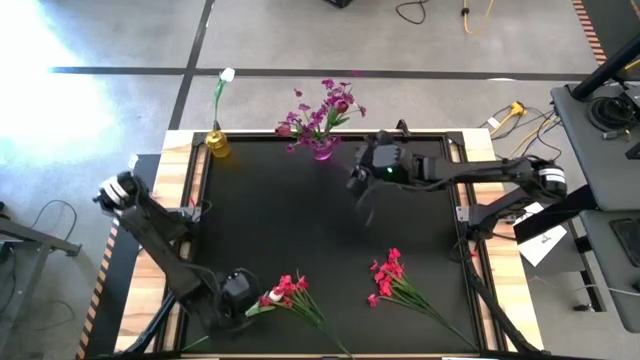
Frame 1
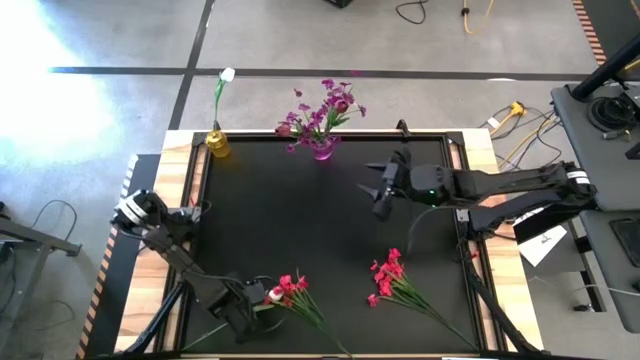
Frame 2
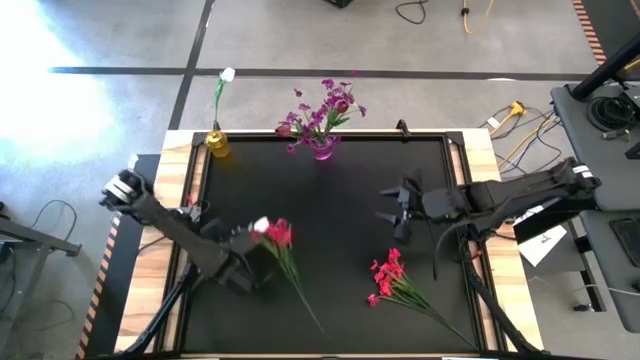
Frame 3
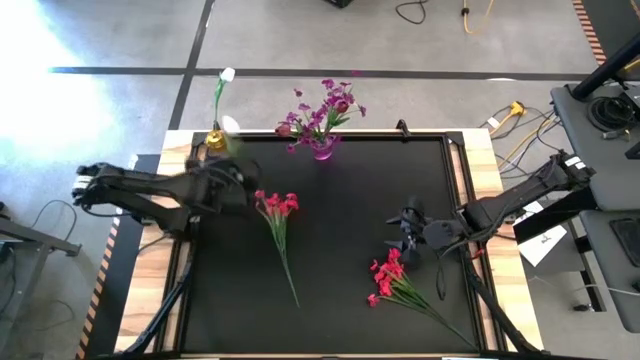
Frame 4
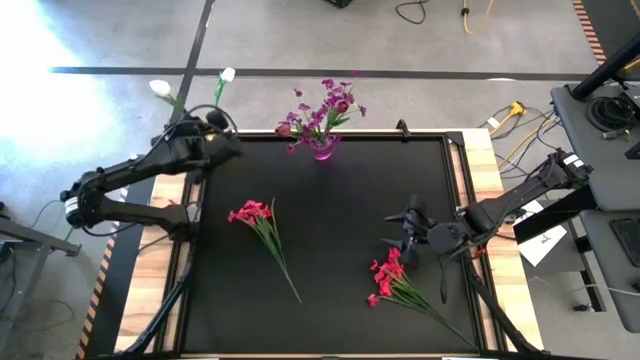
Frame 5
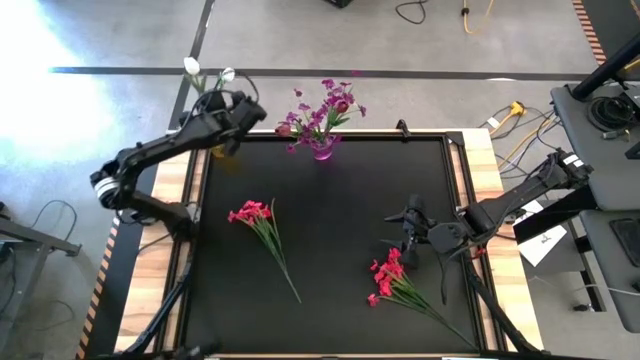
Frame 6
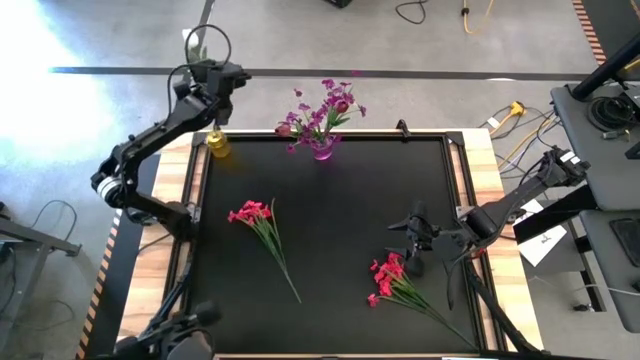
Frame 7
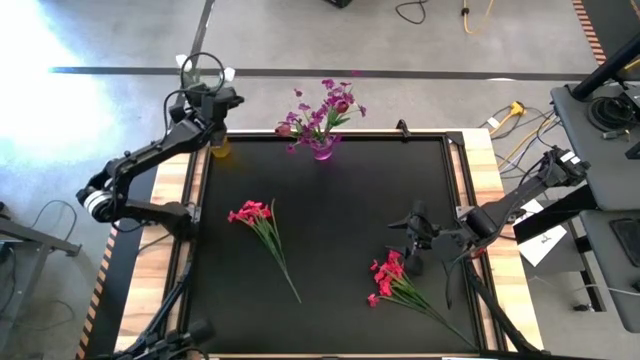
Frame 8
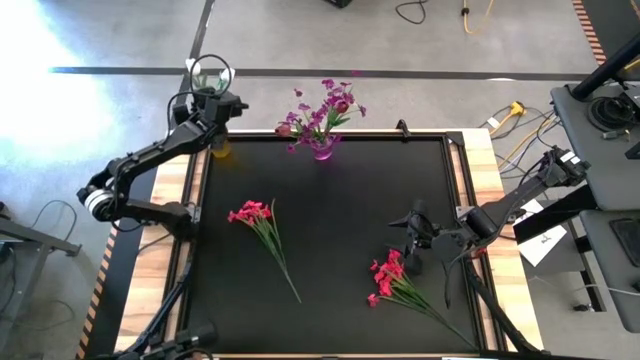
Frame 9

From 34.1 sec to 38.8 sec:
Task: Sort flowers into vase by color
Put the white tulip into the yellow vase

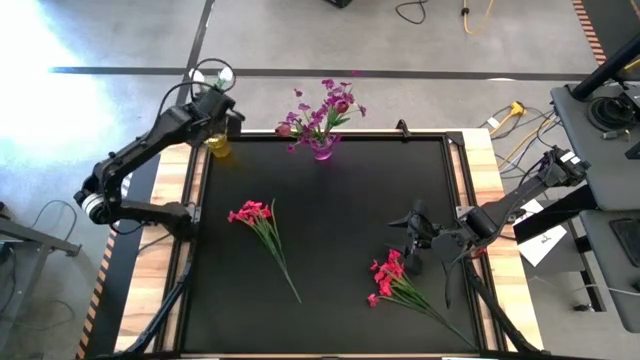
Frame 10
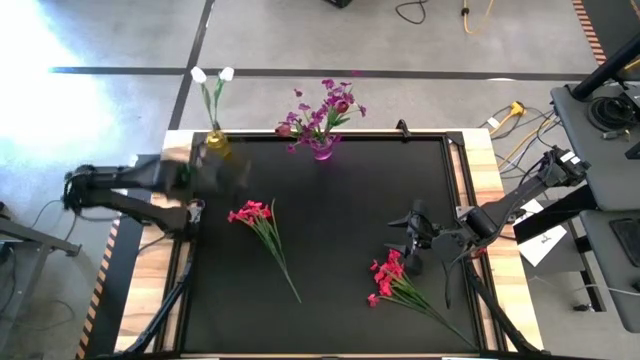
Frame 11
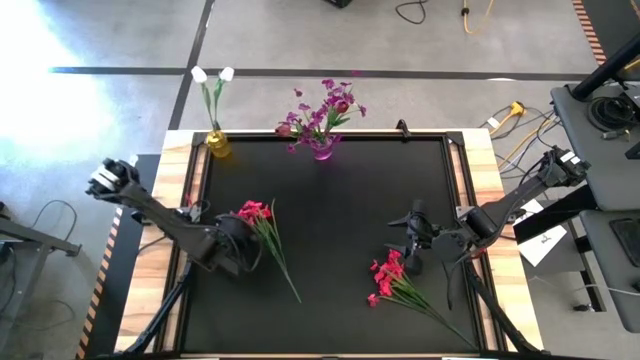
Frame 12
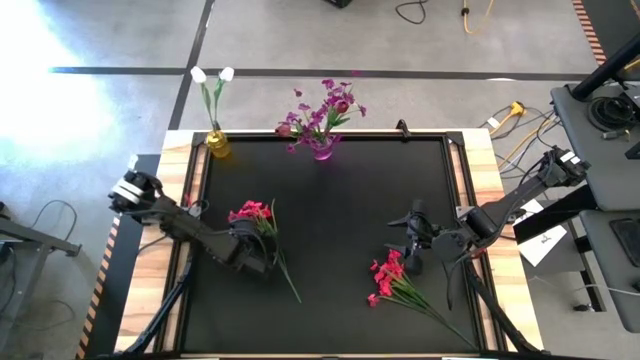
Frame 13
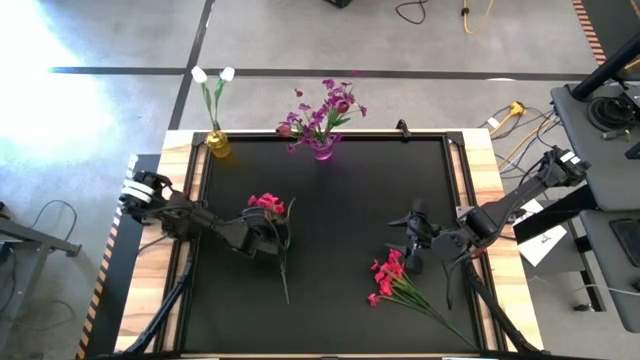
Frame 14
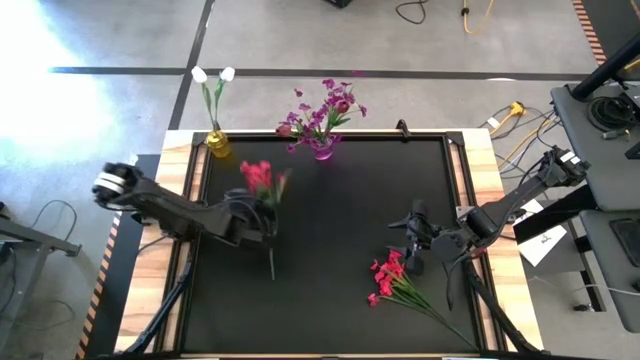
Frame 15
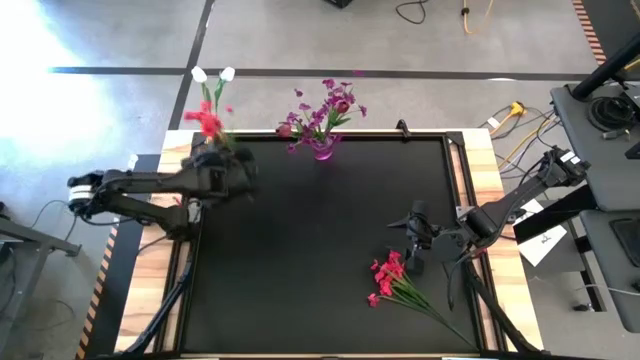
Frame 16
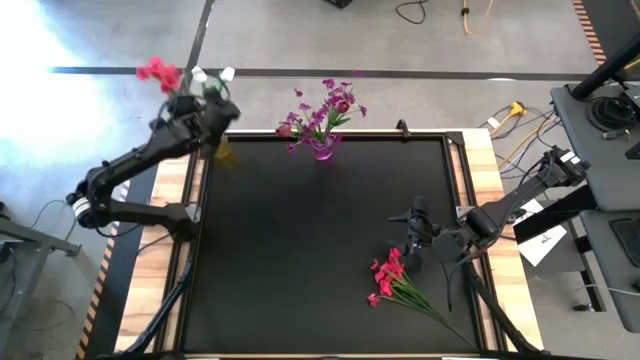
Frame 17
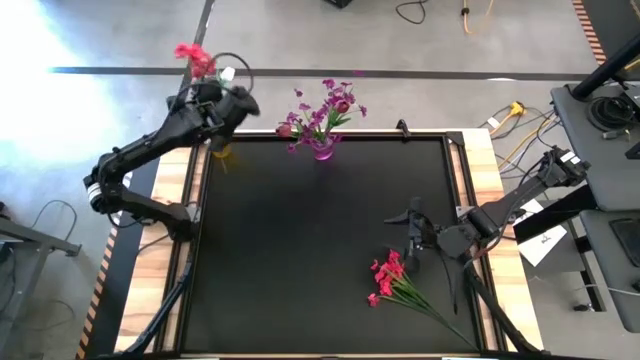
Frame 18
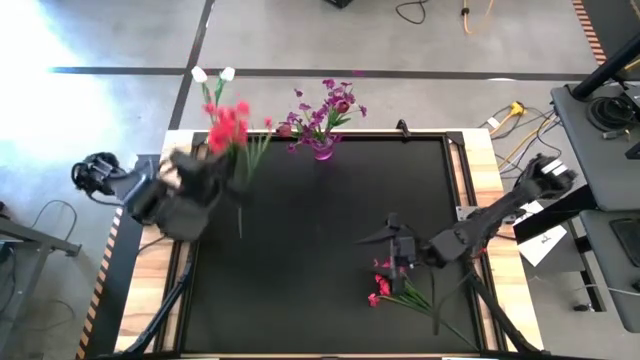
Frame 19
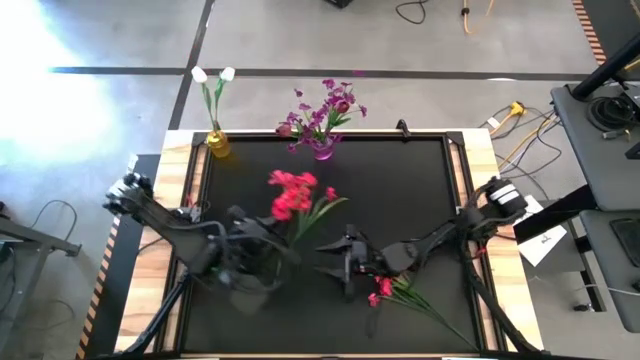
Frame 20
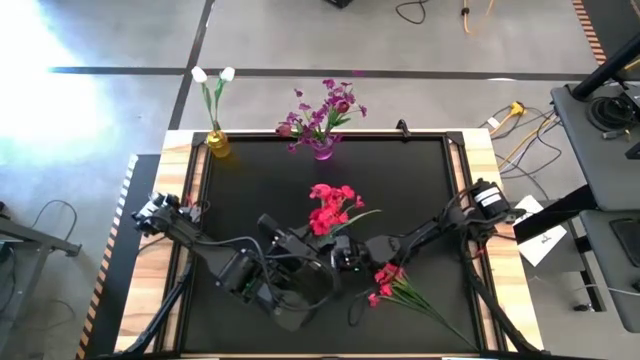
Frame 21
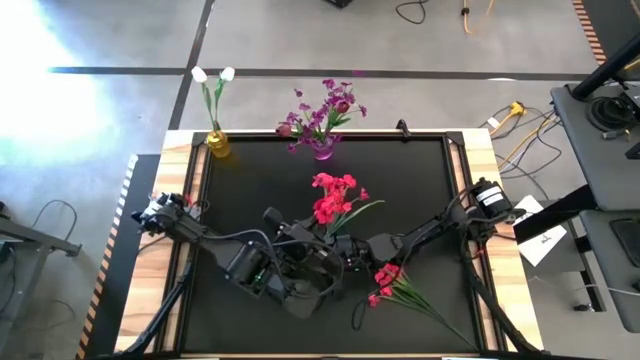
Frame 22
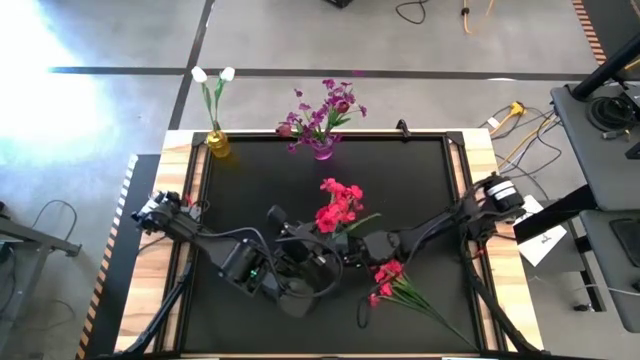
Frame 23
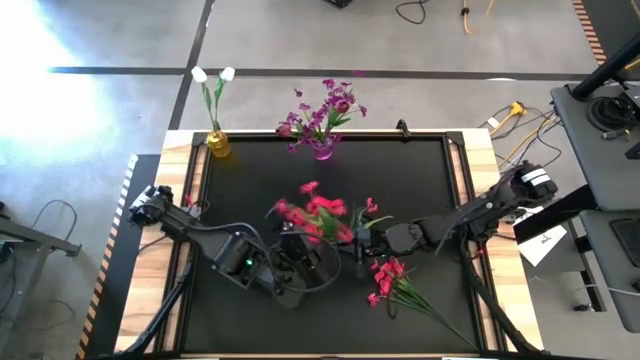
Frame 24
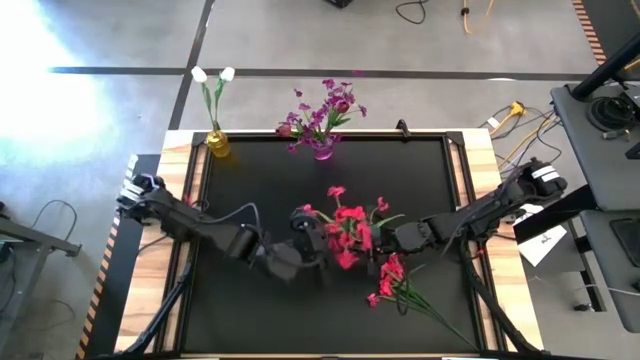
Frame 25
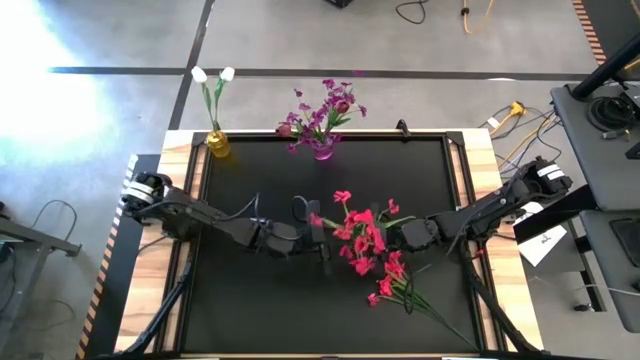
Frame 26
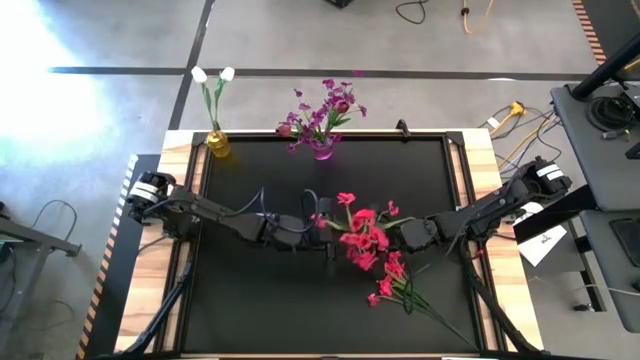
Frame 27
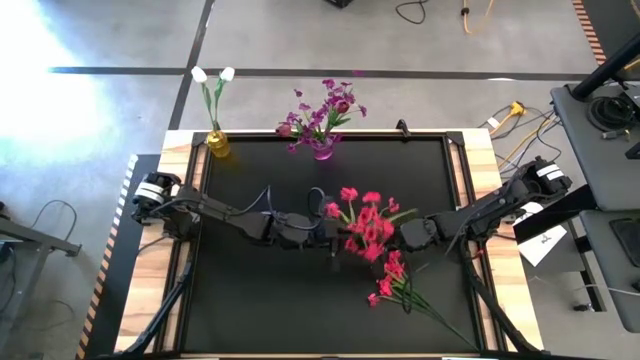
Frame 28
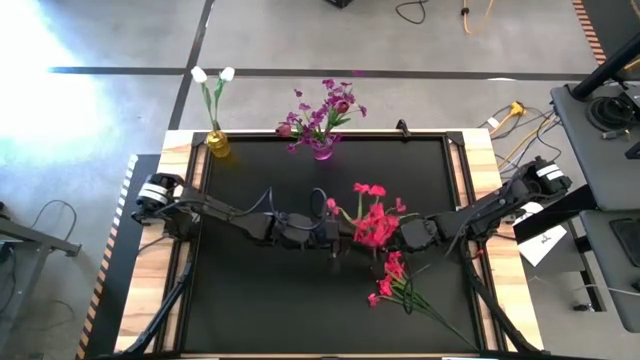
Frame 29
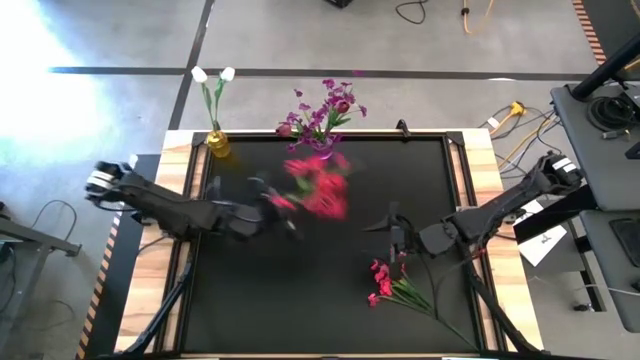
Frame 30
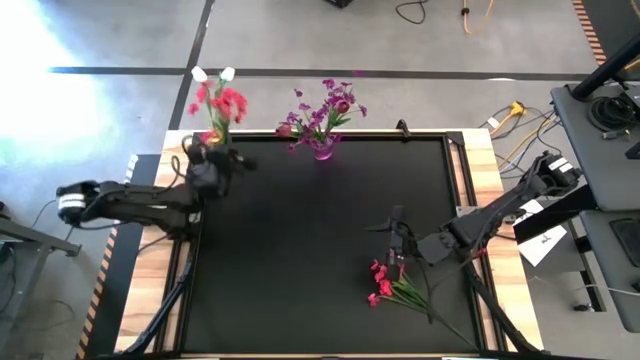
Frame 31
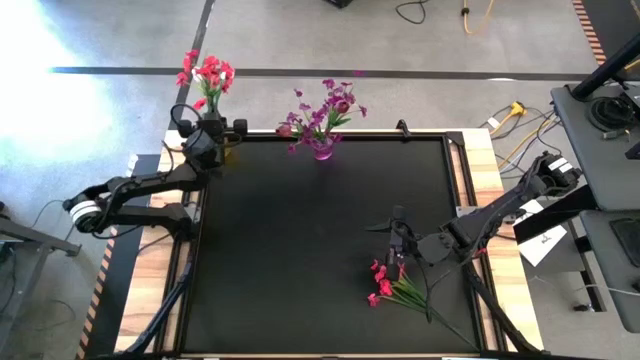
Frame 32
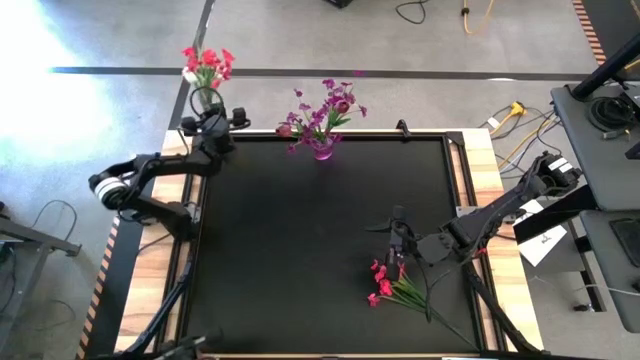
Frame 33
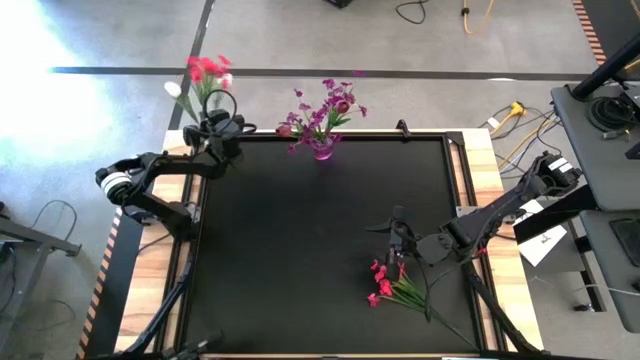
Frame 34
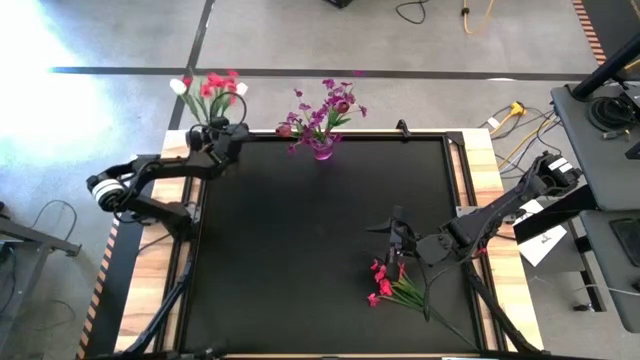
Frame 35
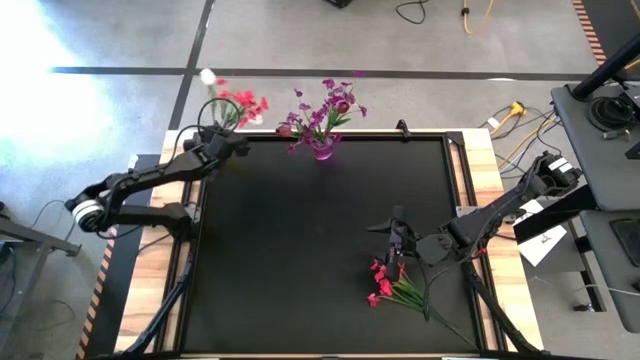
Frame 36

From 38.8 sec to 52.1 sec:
Put the left red flowers into the yellow vase

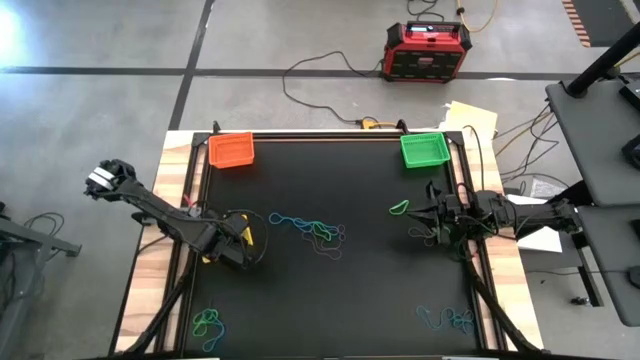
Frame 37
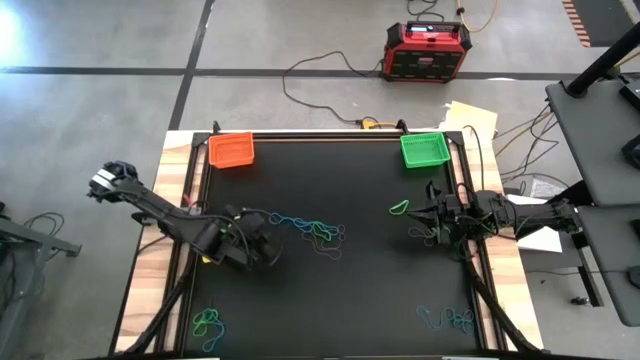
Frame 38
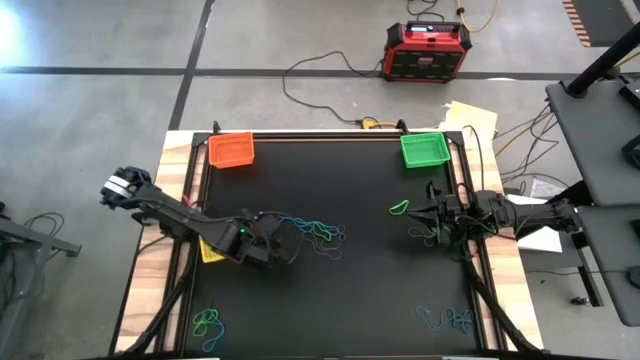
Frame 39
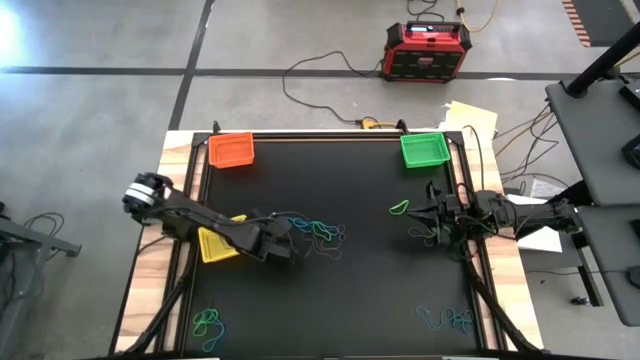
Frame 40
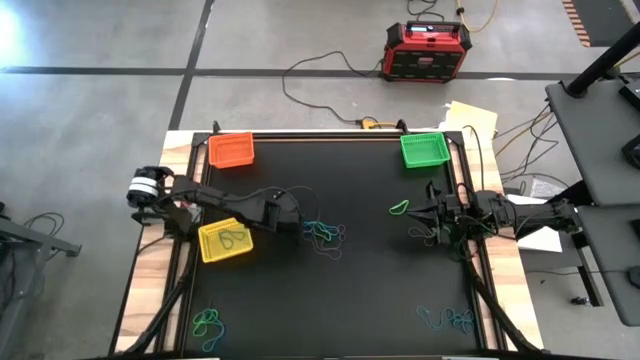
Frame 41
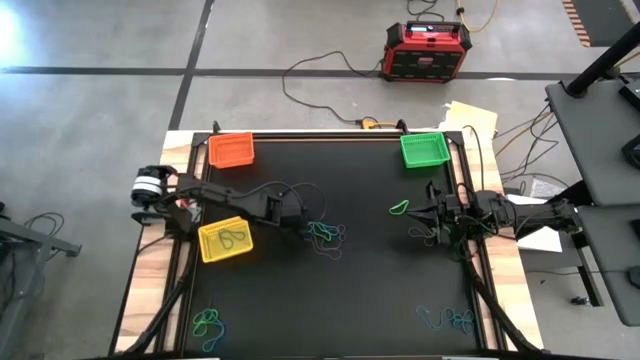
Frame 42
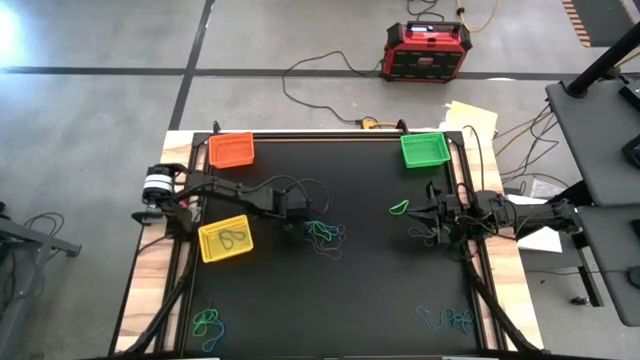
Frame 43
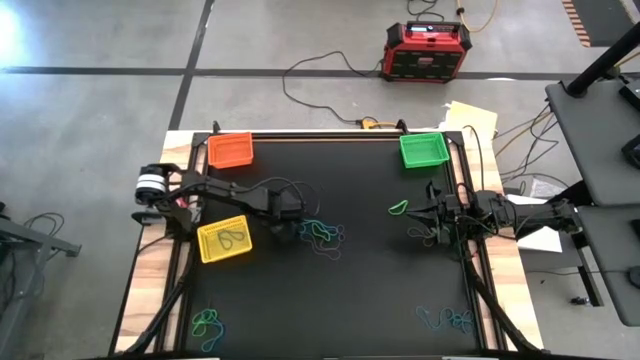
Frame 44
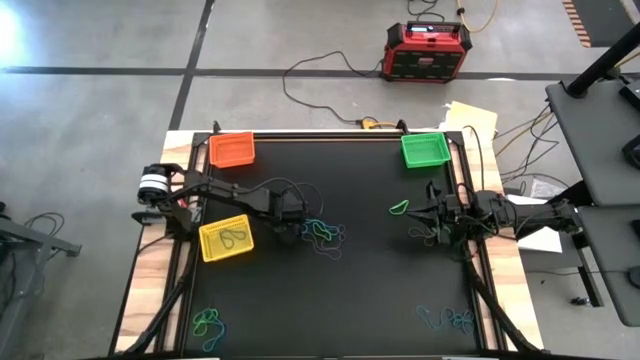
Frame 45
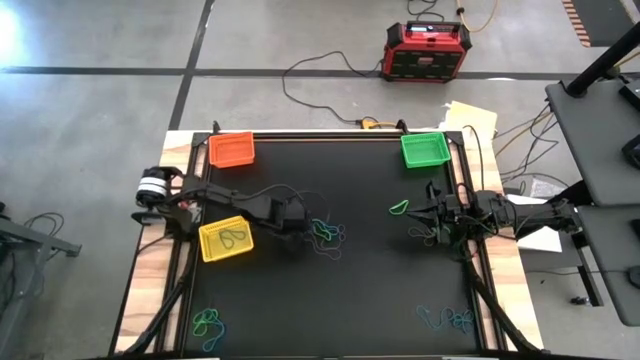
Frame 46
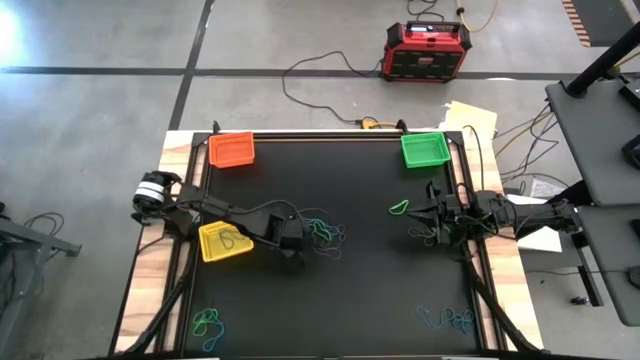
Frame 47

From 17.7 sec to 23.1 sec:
Task: Sort rubber bands into baskets
Put the blue rubber band into the yellow bin
